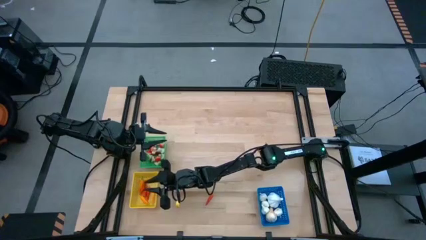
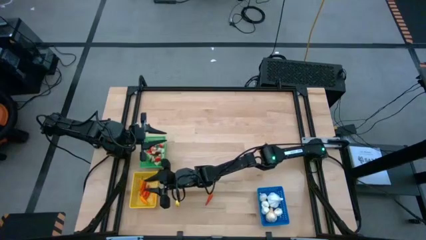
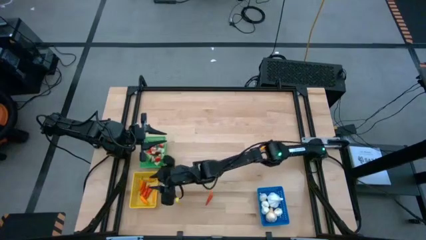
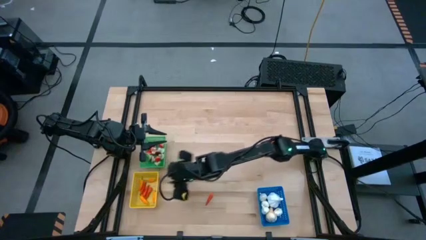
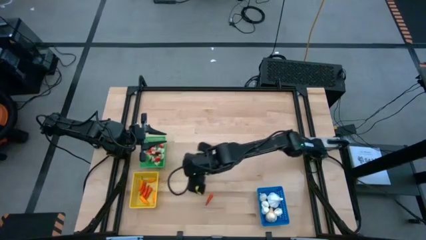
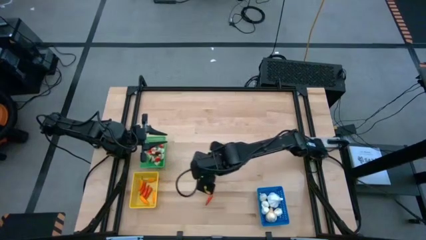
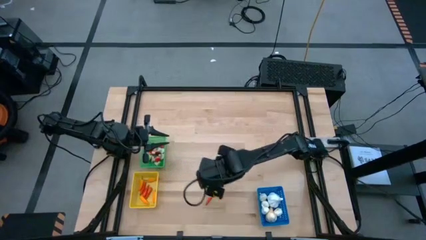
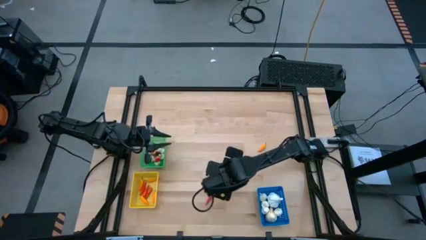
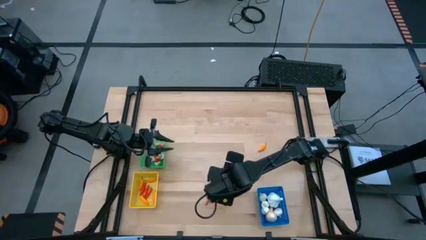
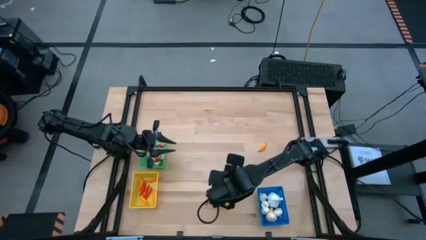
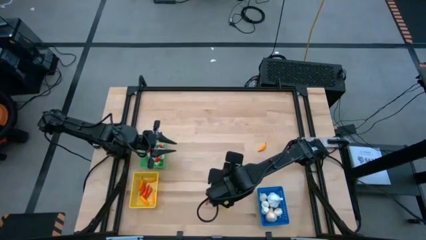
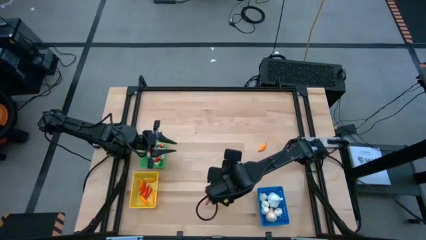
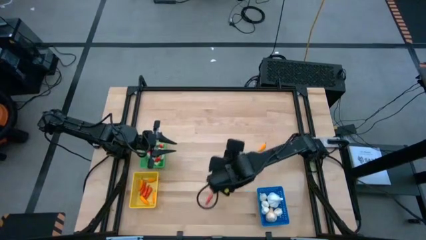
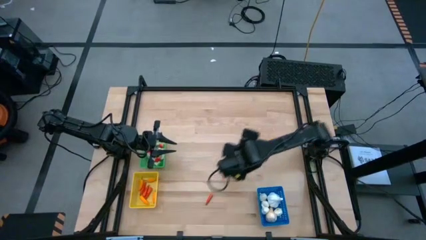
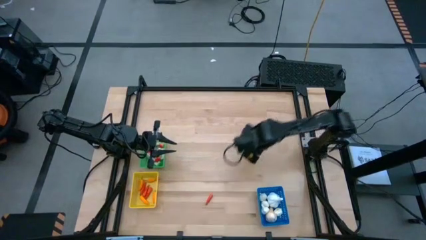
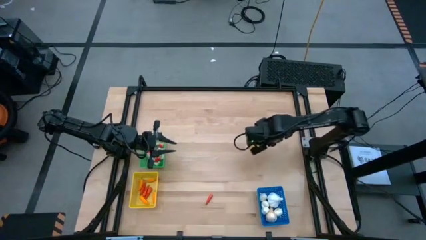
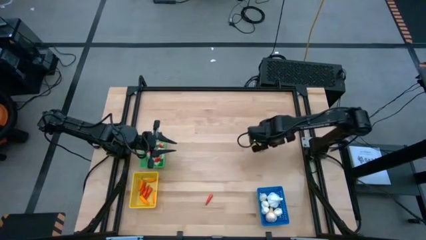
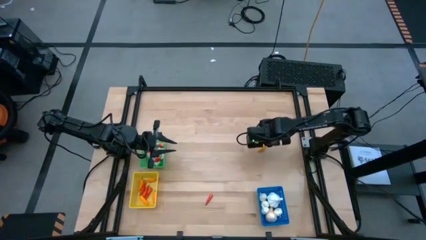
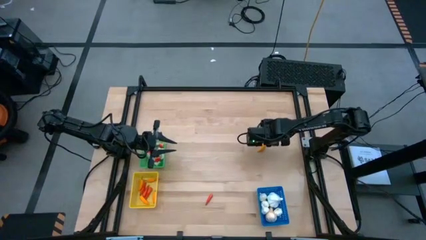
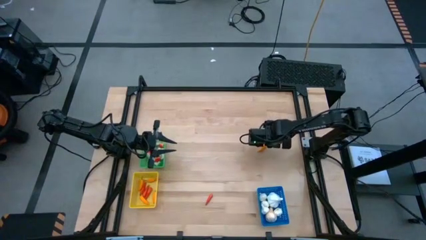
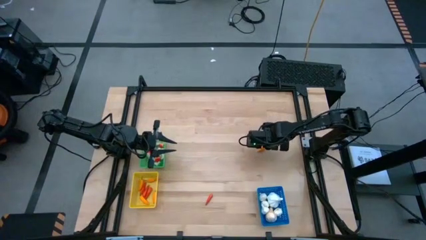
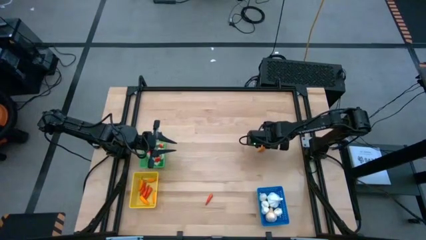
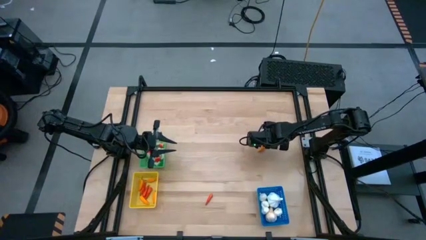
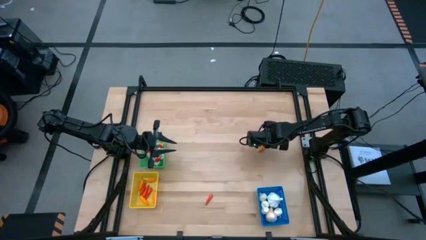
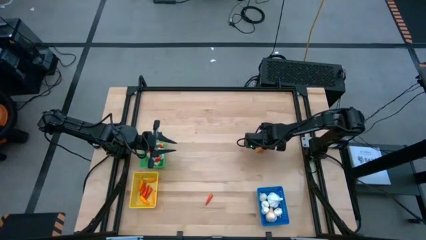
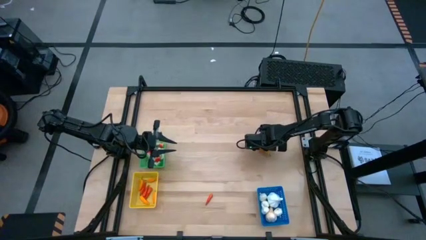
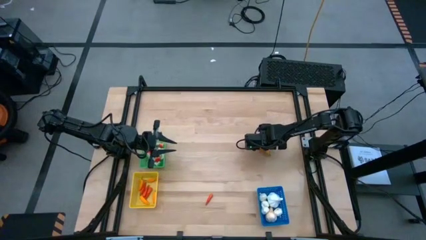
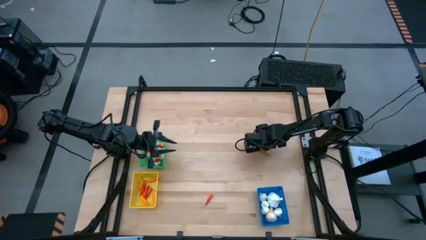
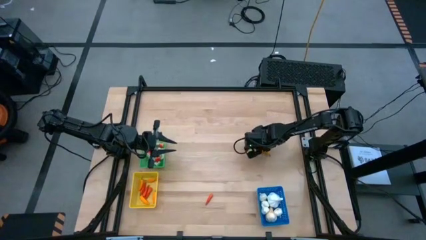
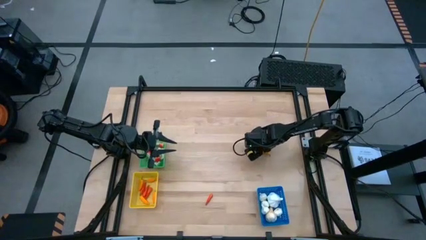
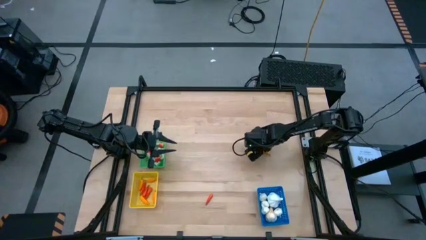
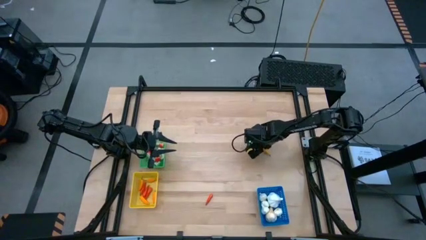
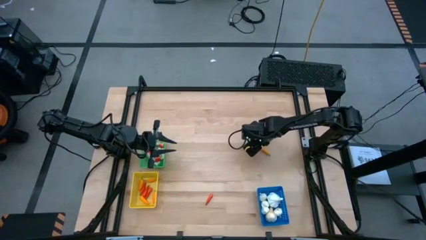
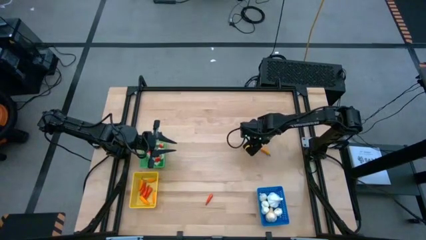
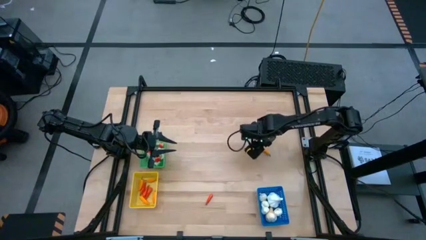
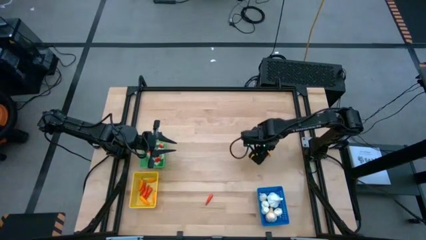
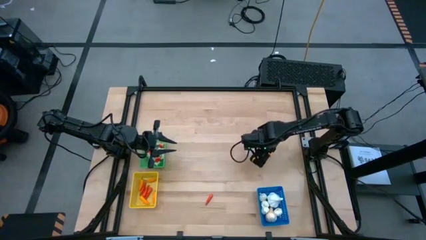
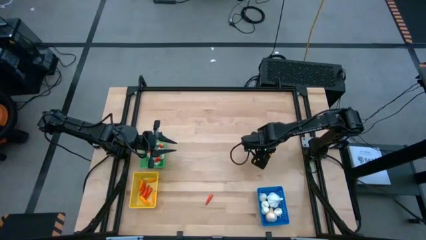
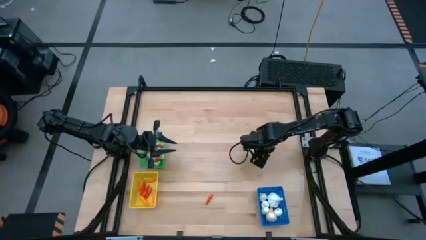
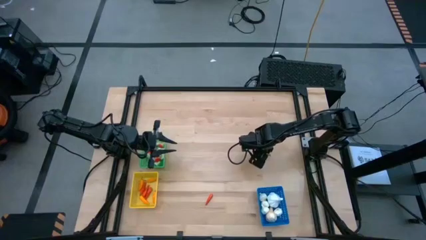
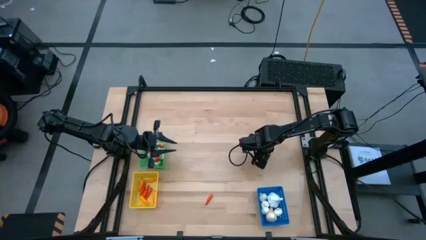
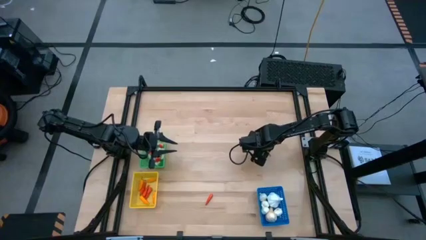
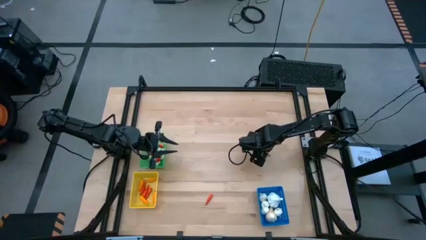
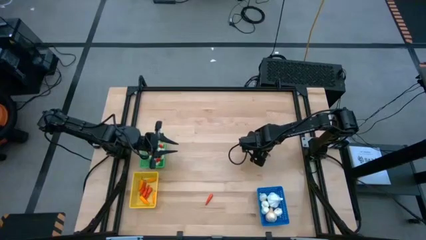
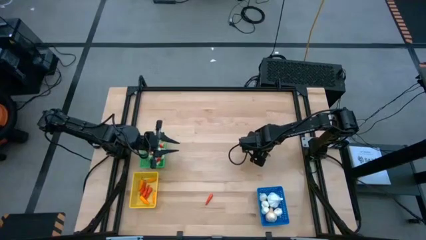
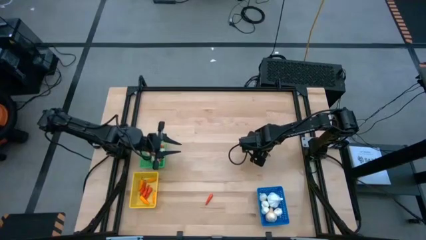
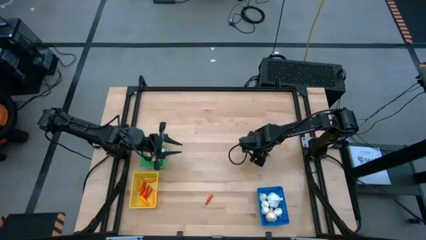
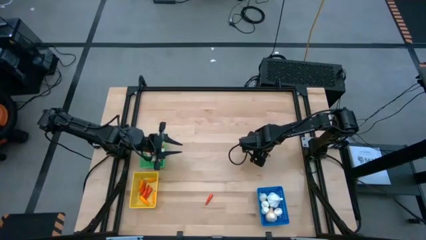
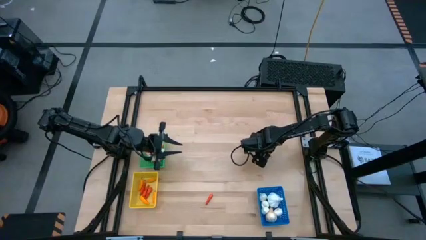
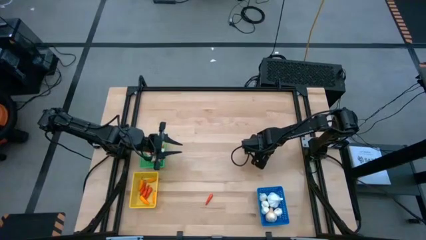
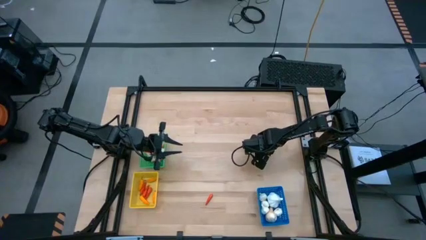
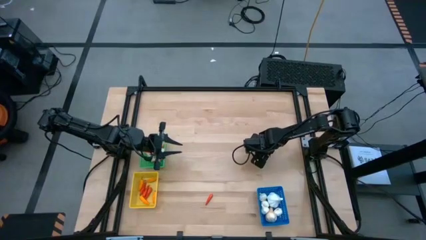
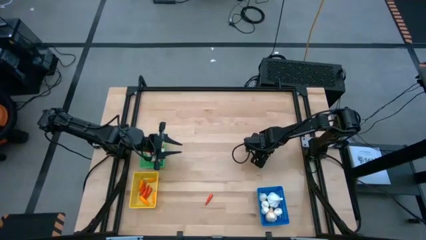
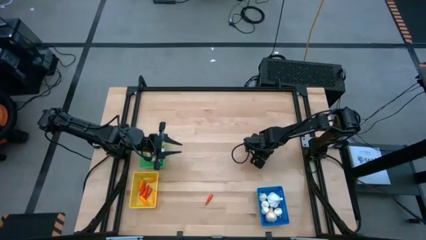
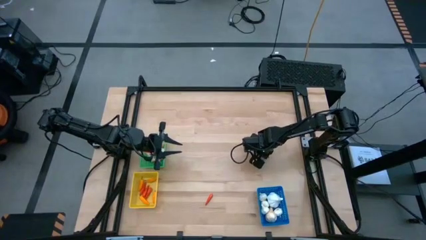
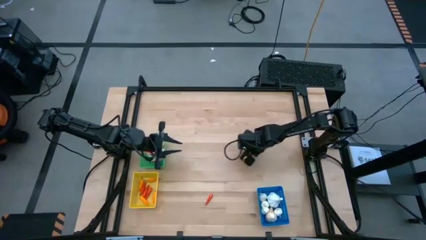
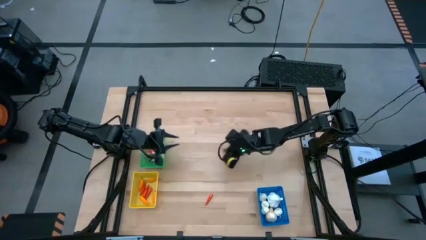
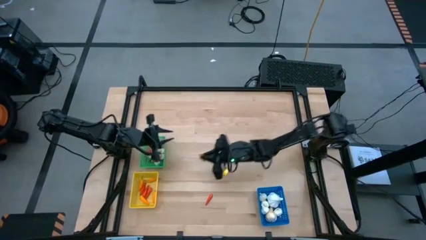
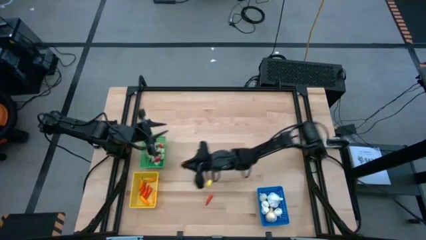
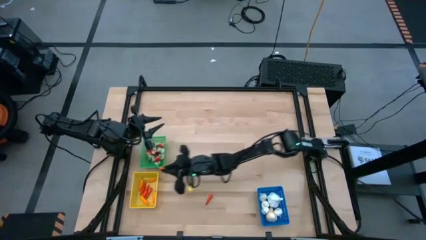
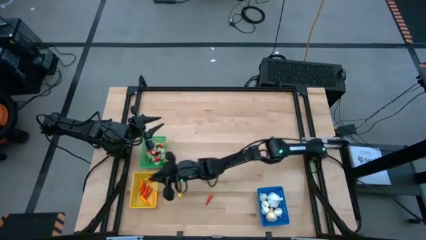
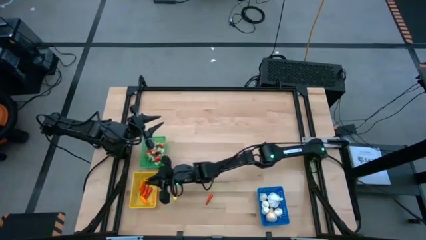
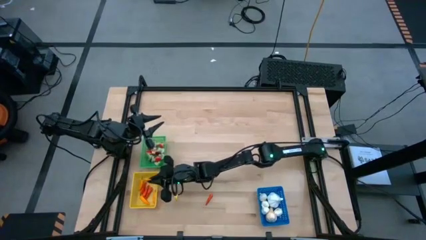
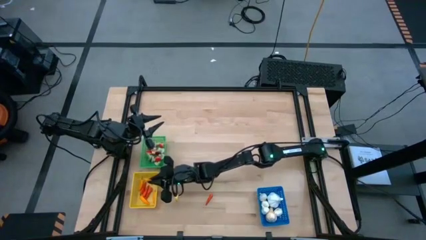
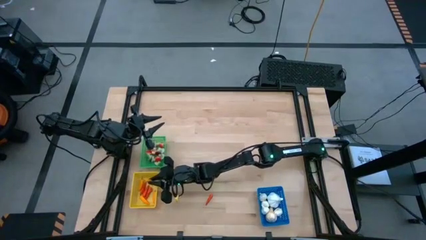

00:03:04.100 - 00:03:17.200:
Task: Sort produce into baskets
Put the yellow chili pepper into the yellow bin

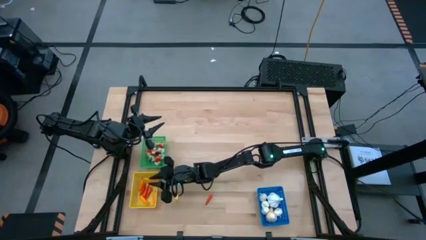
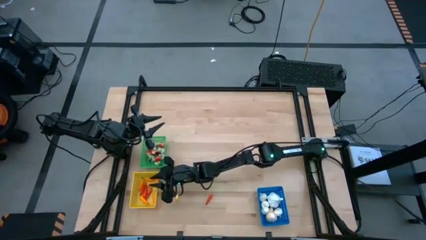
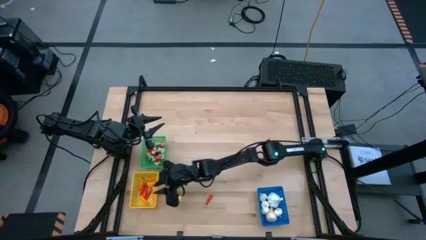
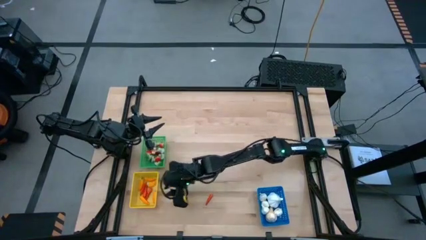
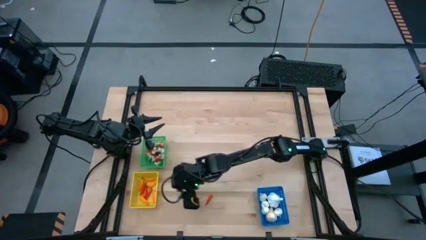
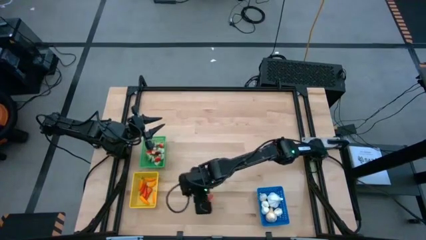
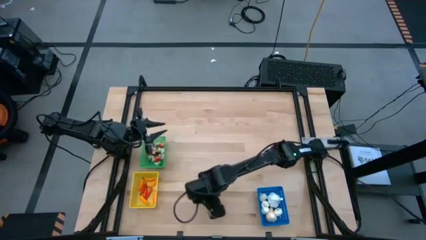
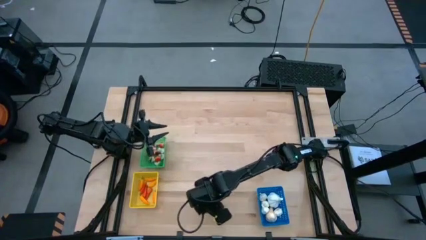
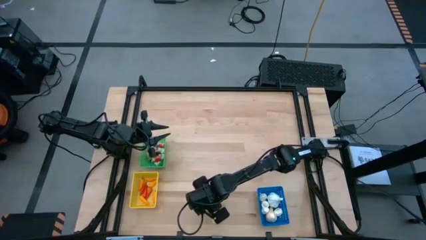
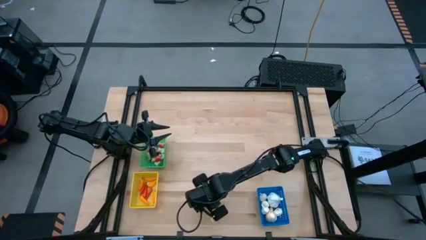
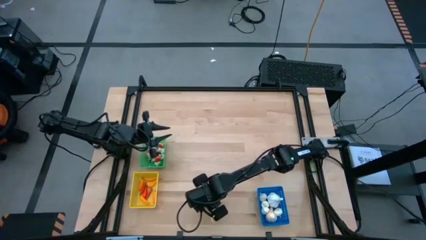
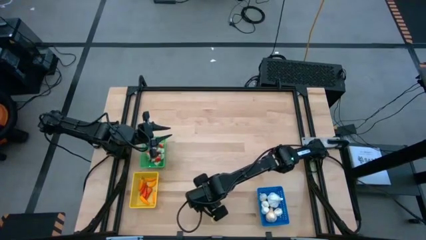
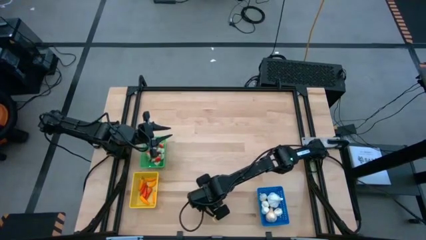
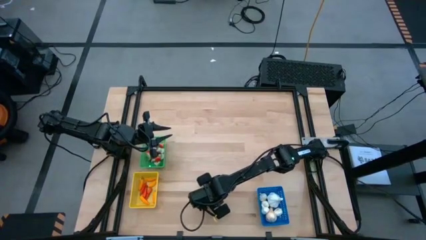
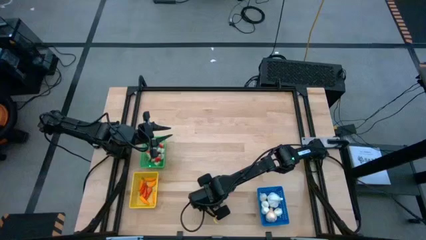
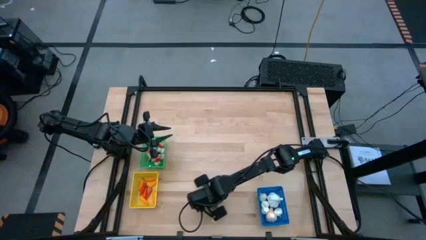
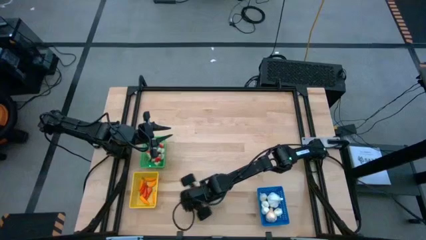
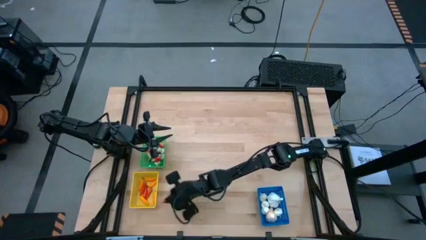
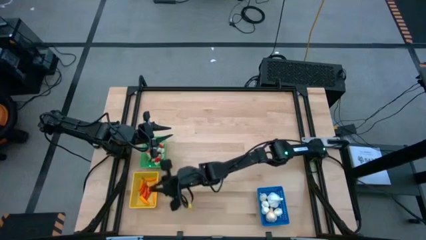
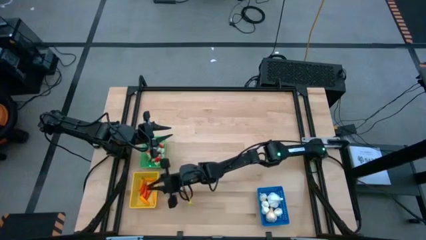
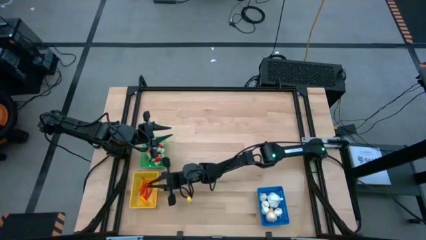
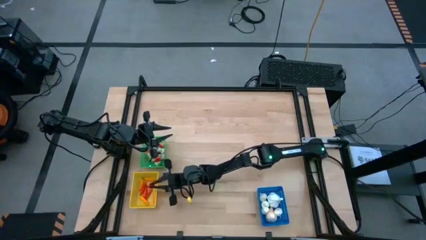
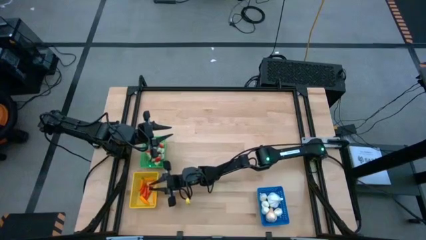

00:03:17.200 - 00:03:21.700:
Put the red chili pepper into the yellow bin

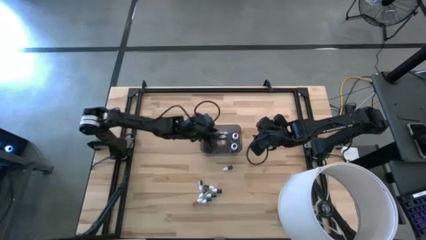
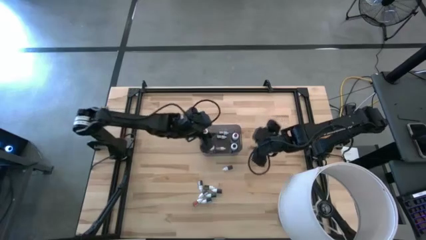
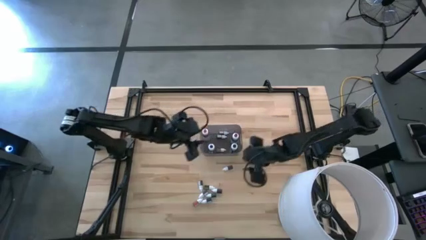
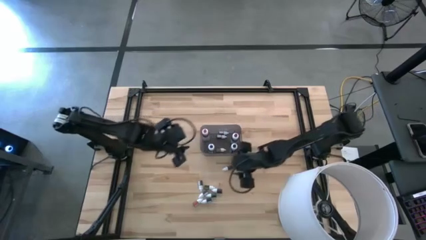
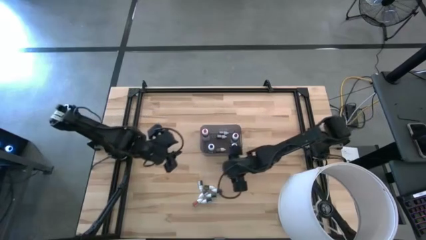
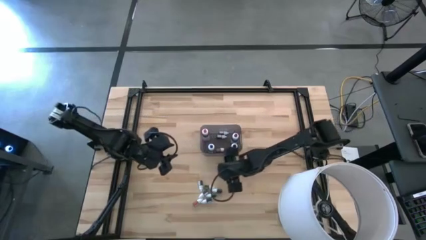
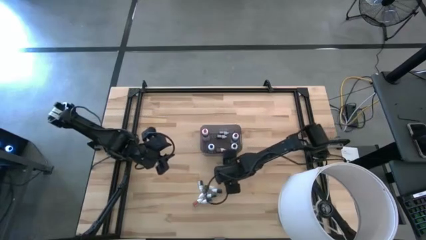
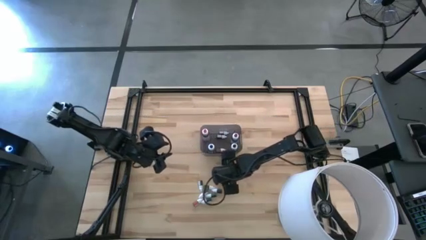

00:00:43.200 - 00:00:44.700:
Task: Pick & Place food coloring
Put the top small red food coloring bottle in the black bin
